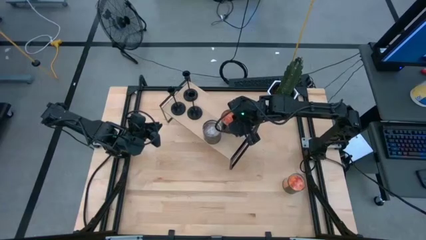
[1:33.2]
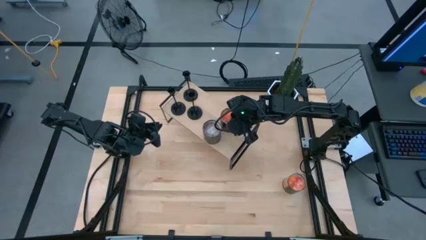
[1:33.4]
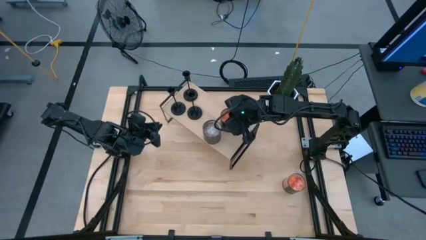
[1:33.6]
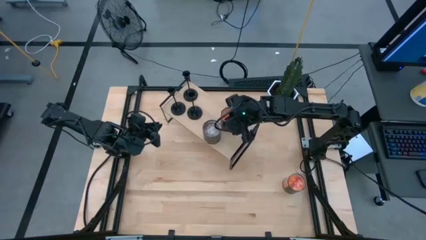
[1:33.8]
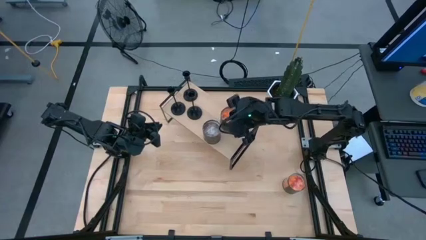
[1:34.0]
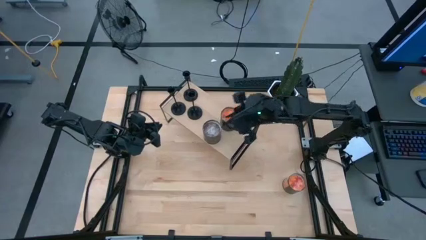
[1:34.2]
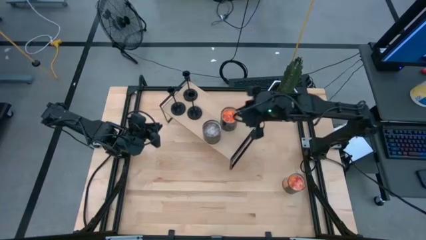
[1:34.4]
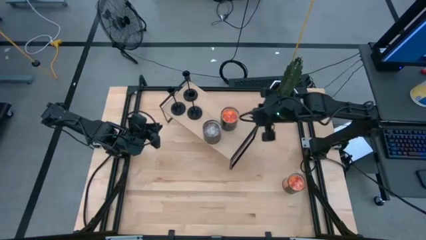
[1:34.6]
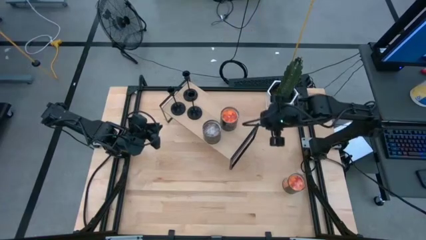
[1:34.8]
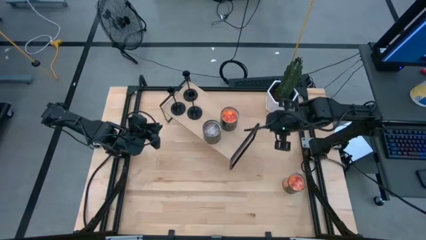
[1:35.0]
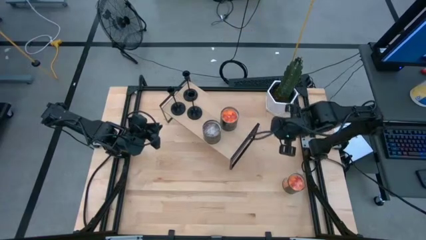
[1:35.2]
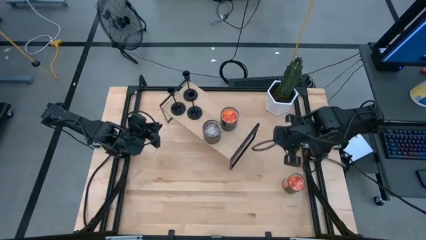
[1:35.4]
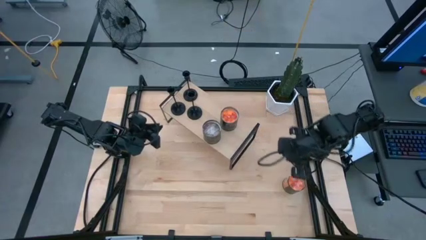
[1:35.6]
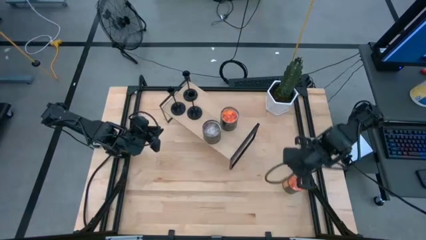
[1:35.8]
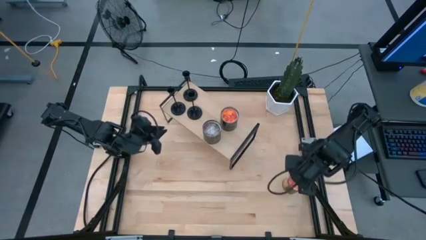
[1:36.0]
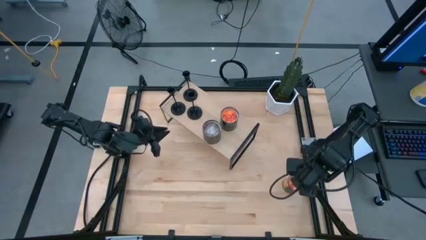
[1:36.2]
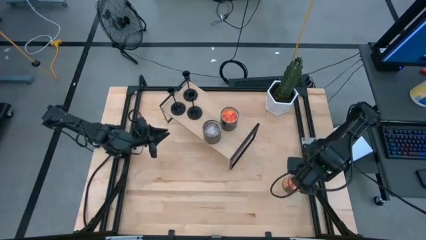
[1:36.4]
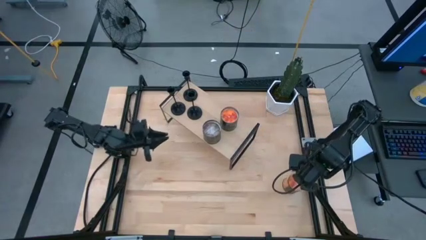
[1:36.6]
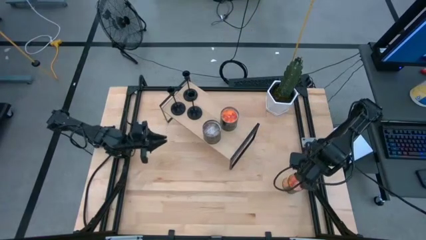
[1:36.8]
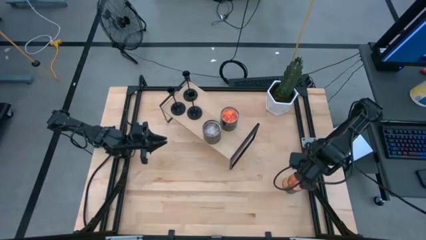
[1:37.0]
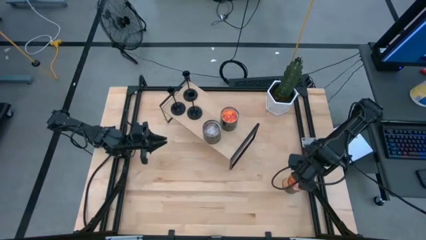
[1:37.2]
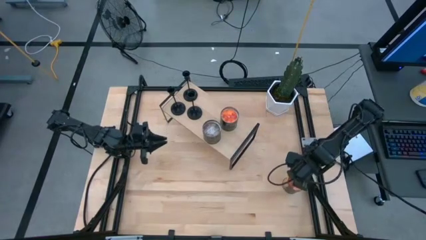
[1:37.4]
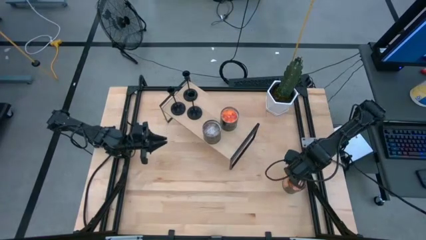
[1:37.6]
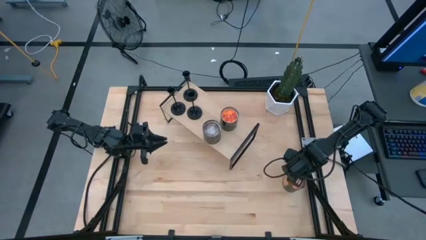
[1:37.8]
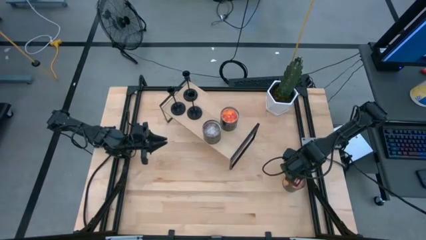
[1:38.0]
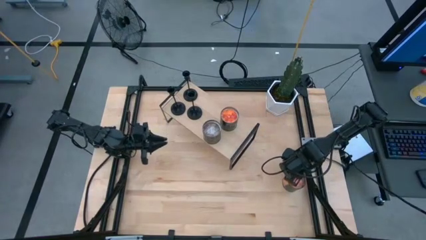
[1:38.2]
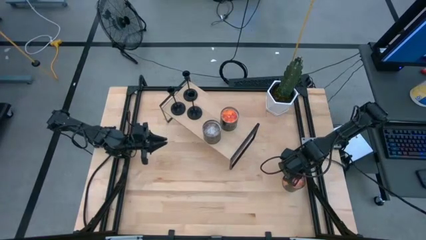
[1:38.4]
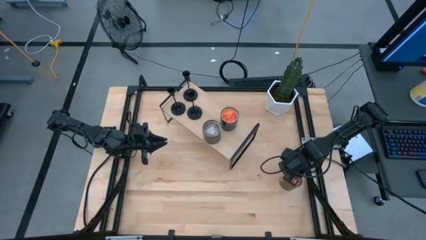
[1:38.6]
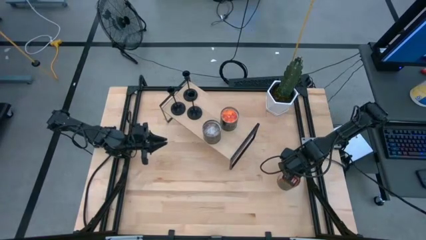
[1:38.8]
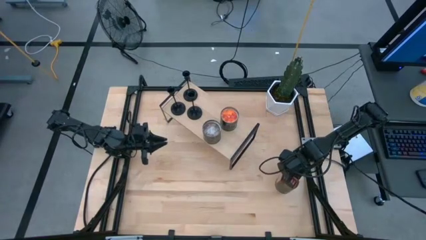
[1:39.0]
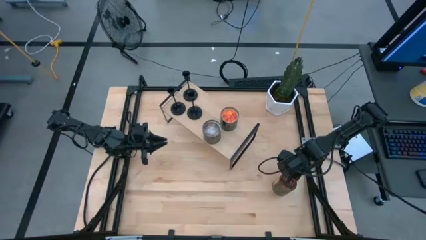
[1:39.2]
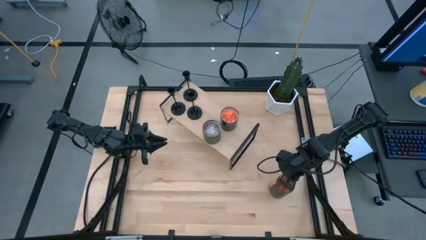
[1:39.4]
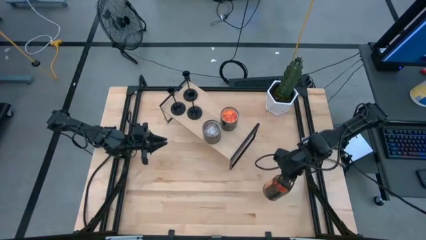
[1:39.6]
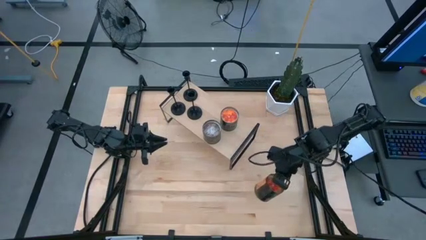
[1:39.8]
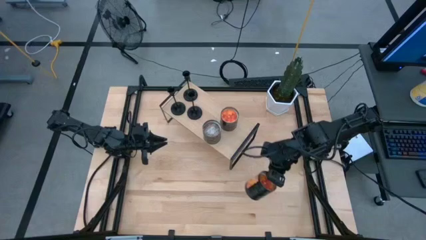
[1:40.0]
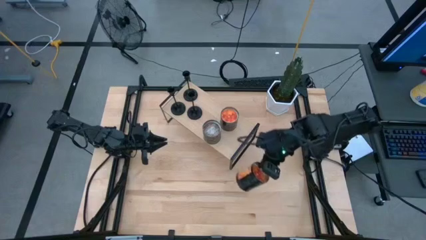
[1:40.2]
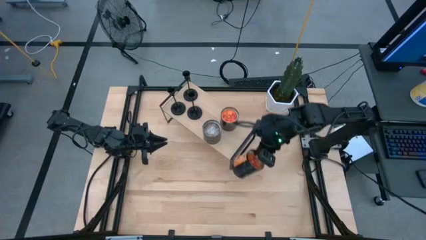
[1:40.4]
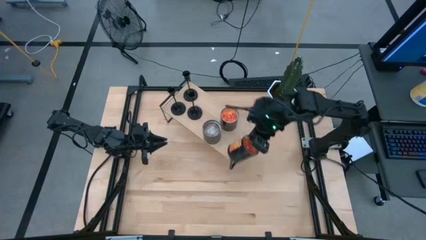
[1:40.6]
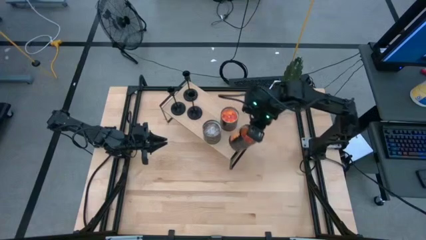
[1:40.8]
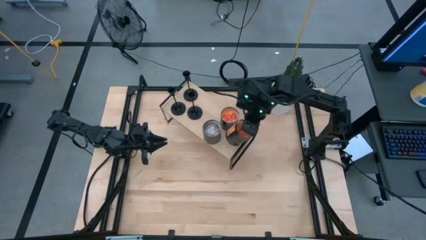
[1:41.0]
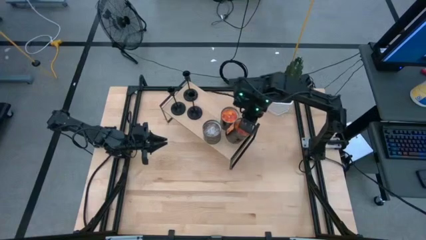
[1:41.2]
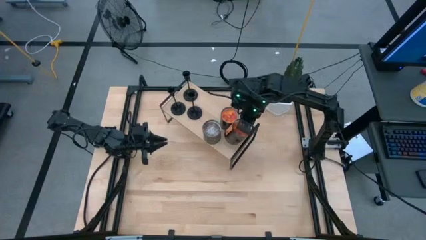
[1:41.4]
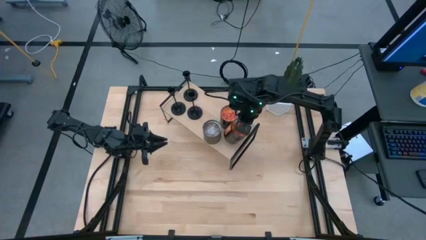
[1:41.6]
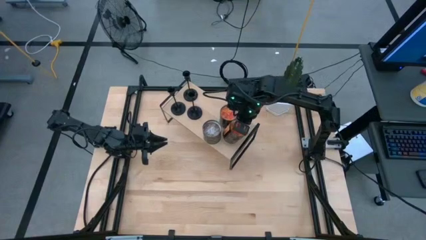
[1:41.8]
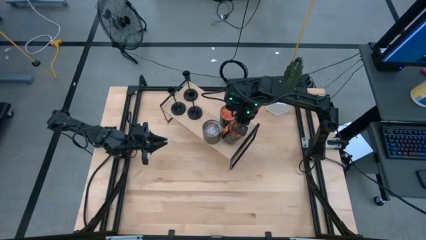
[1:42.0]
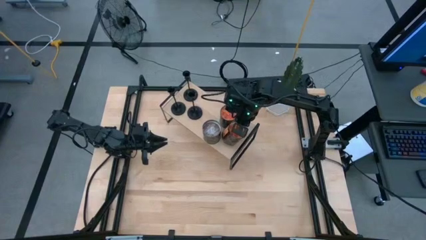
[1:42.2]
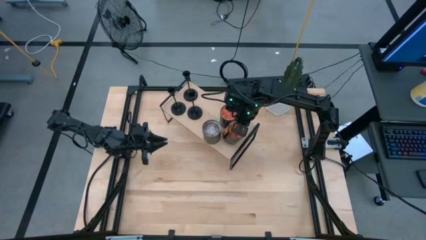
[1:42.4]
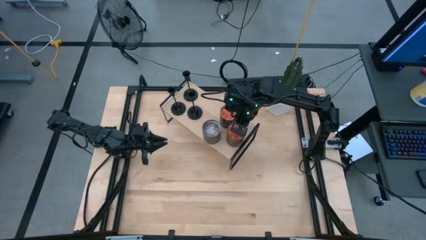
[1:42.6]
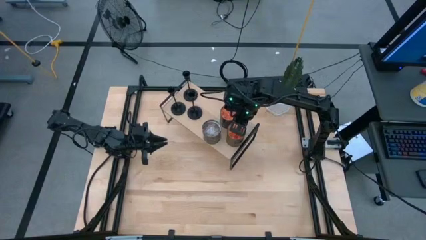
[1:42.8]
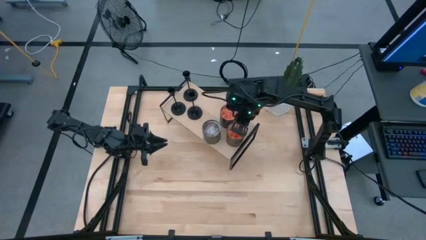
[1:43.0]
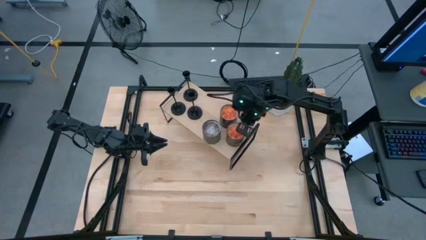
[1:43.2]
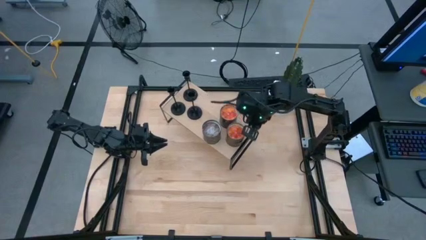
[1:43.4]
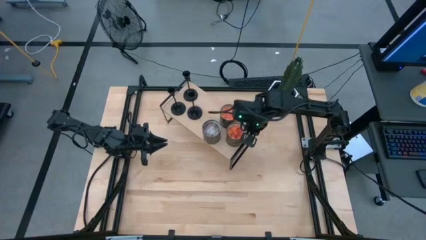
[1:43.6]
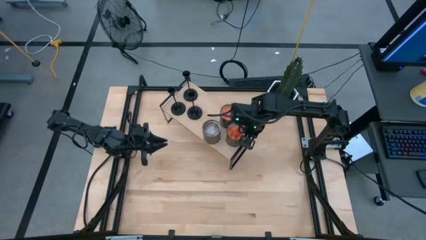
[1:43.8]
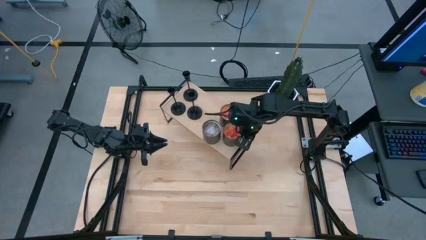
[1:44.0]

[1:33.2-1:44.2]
Task: Pick & Place candle stick holders
Put the orange scented candle on the shelf

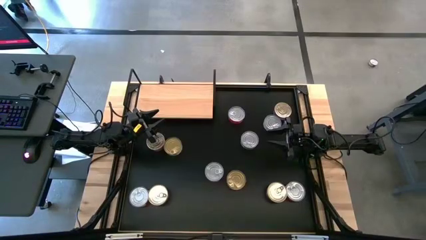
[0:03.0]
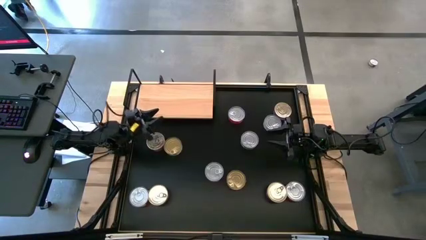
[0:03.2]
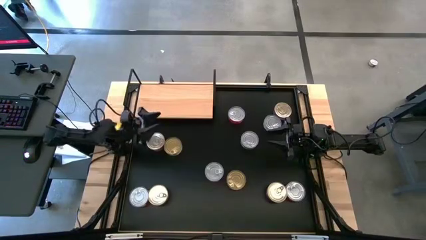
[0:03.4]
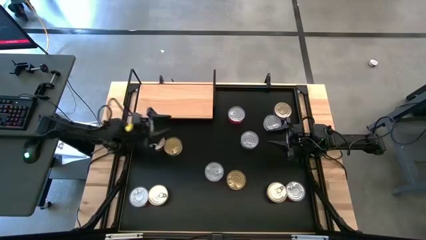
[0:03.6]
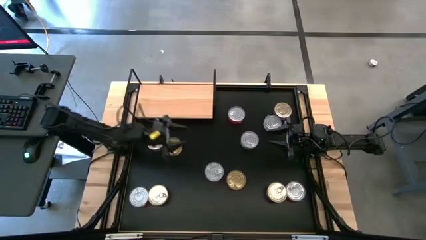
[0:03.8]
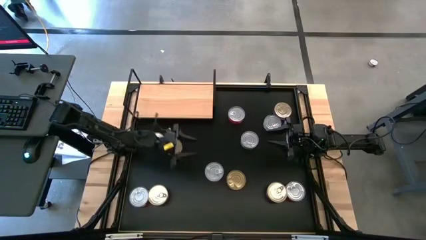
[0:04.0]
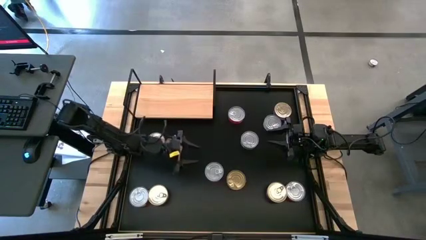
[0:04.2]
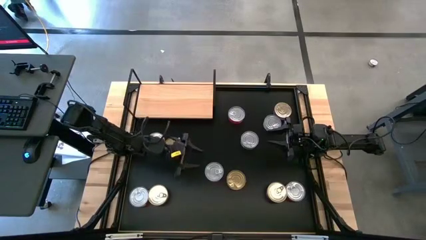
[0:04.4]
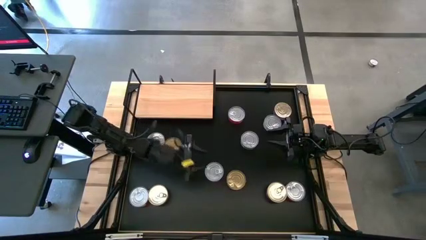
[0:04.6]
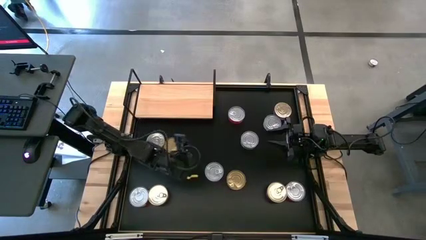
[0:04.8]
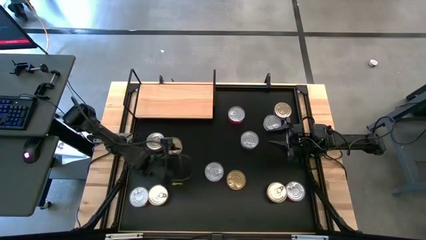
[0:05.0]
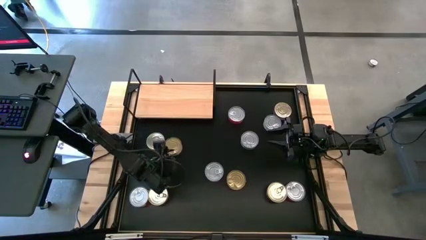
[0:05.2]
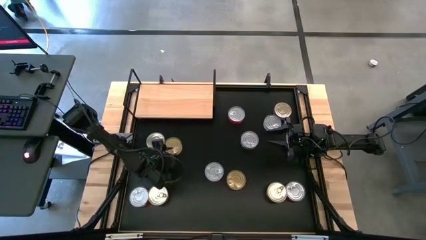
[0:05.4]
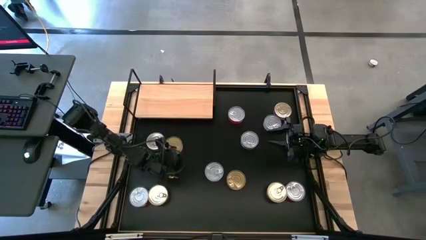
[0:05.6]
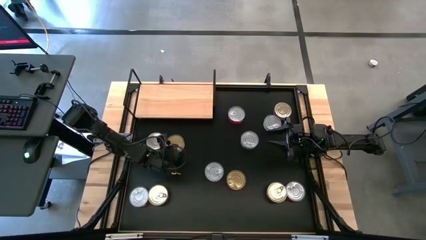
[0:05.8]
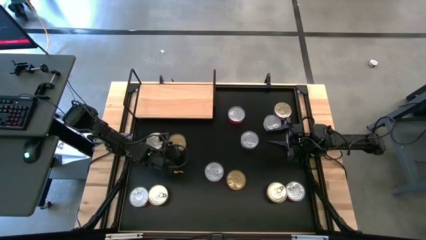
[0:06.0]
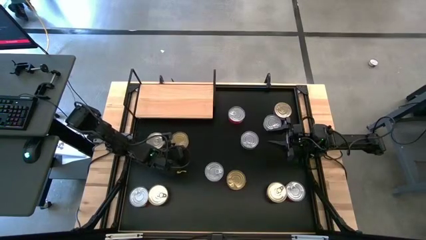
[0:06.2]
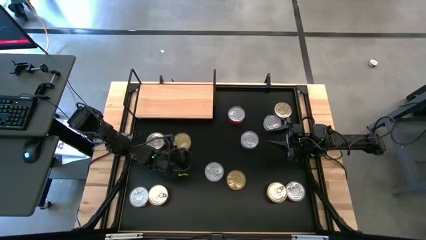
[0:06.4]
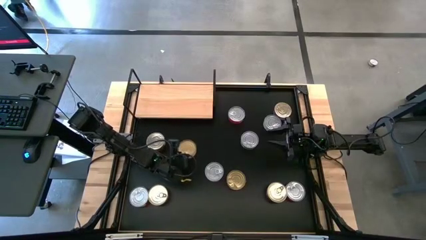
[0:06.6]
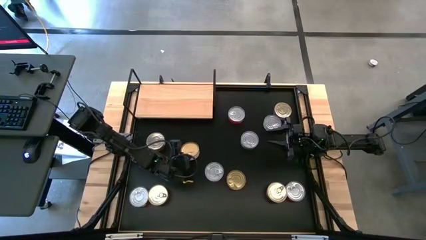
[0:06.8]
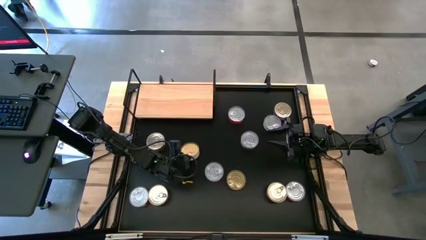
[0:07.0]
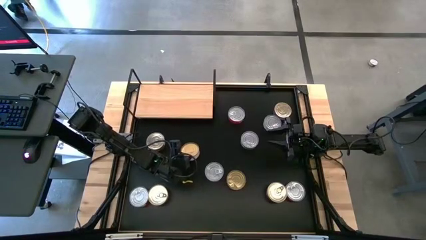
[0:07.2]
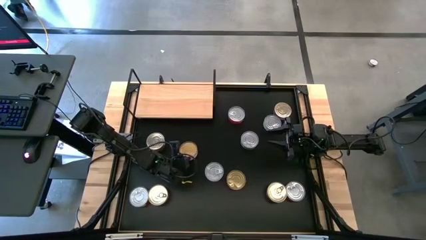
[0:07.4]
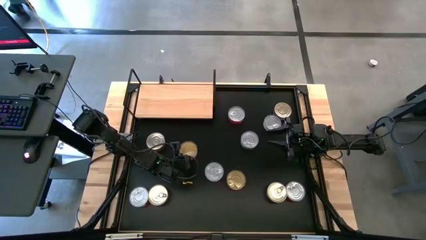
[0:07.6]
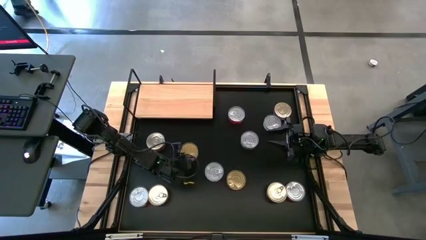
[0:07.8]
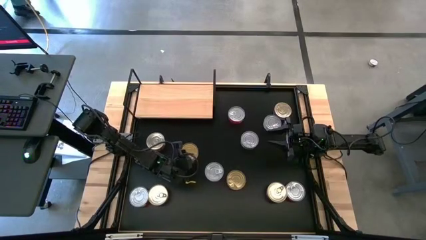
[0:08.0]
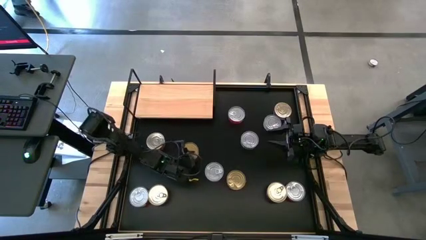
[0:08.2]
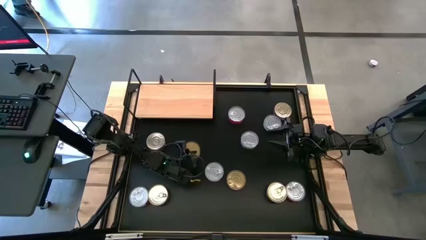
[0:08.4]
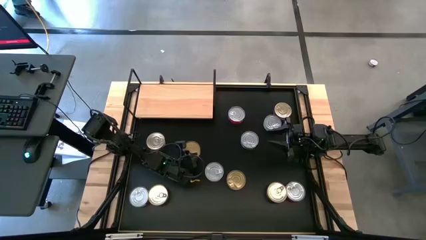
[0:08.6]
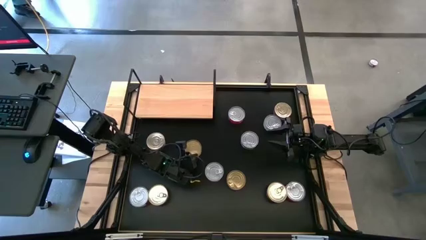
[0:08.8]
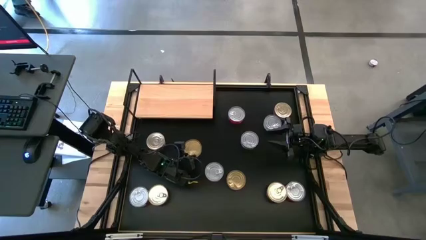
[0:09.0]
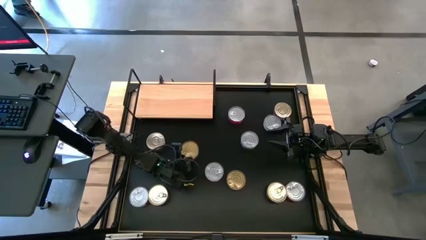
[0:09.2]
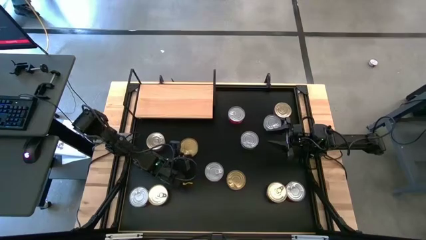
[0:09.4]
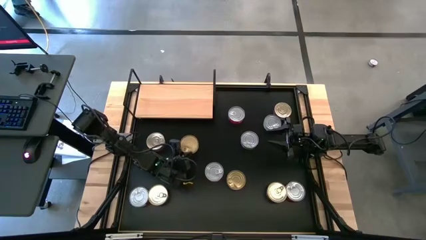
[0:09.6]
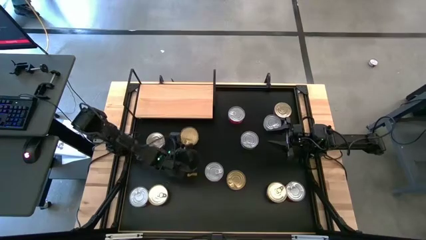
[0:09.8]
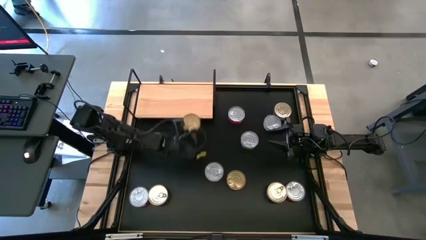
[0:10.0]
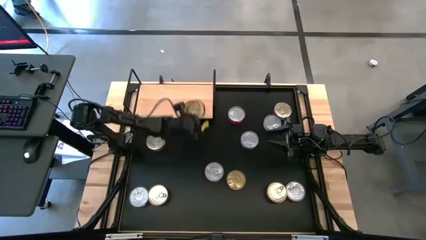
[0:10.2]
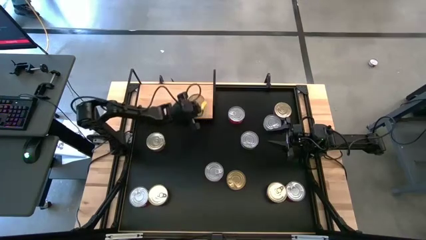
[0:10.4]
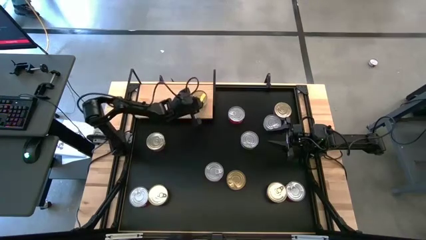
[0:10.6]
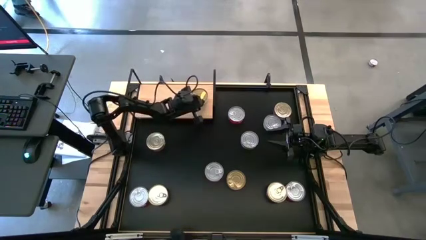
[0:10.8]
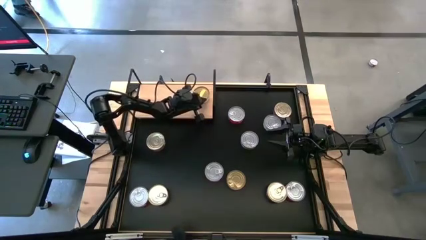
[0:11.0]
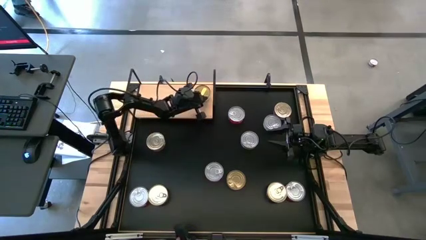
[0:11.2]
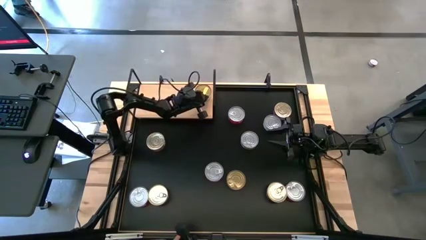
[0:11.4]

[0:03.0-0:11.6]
Task: Stack canned seafood by type on shelf
Put the green tuna can on the shelf
